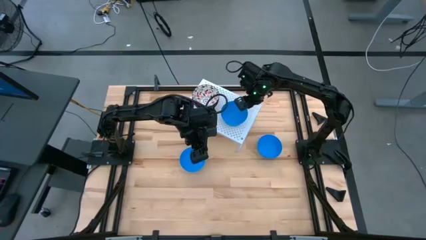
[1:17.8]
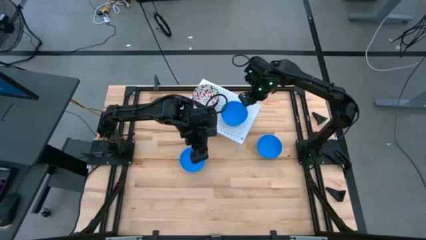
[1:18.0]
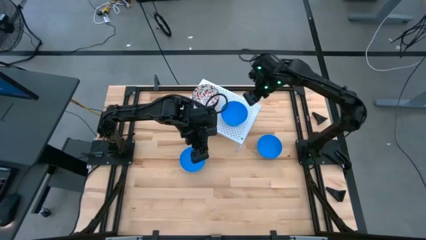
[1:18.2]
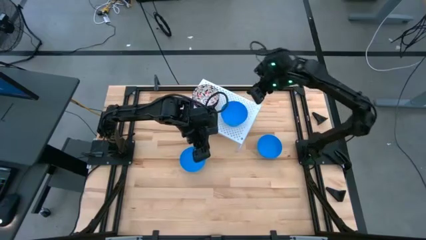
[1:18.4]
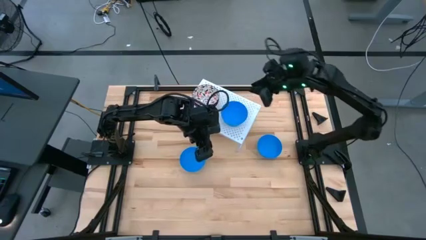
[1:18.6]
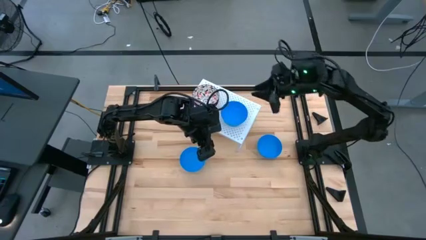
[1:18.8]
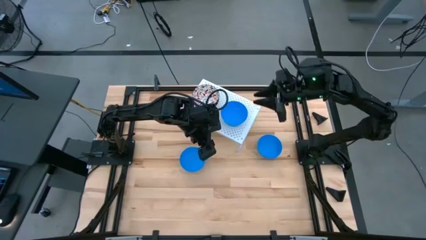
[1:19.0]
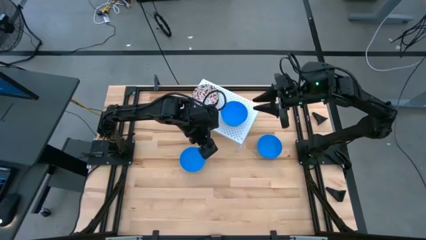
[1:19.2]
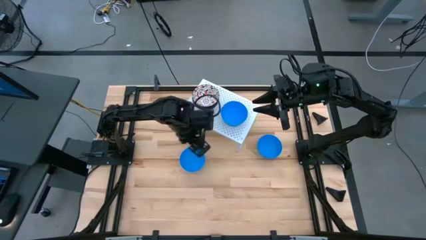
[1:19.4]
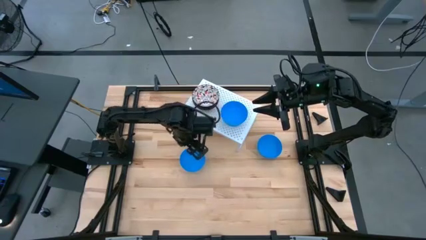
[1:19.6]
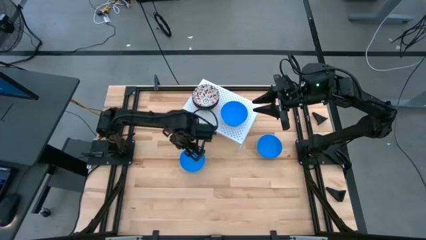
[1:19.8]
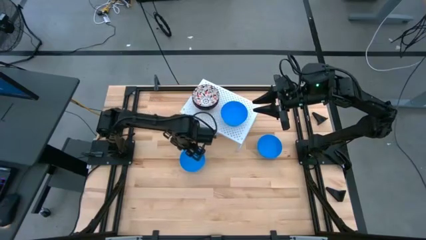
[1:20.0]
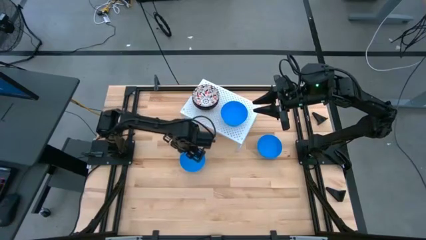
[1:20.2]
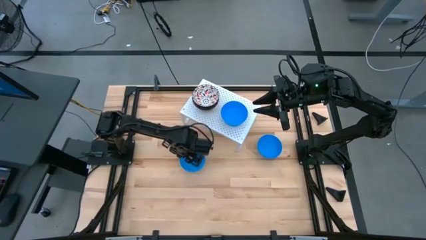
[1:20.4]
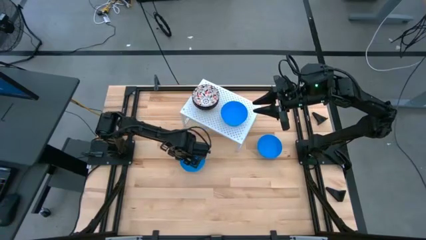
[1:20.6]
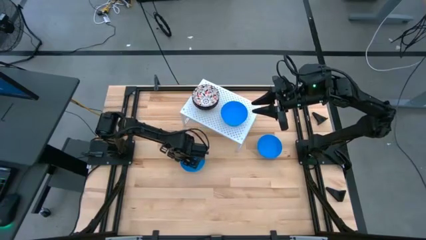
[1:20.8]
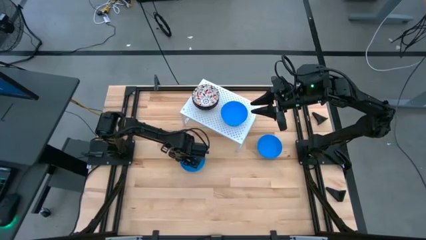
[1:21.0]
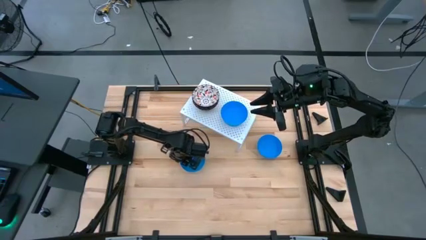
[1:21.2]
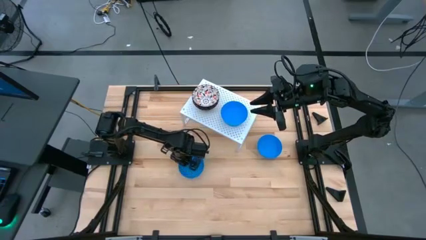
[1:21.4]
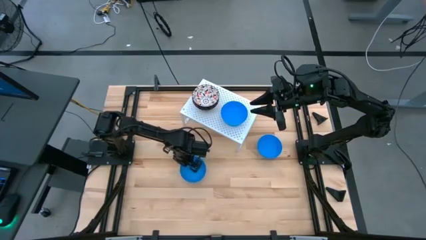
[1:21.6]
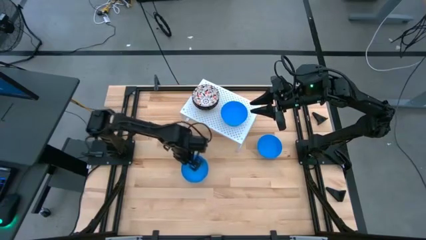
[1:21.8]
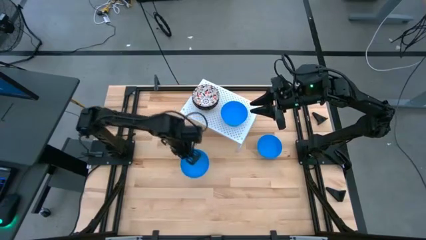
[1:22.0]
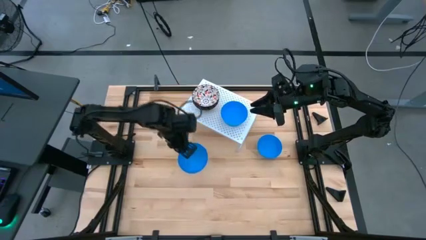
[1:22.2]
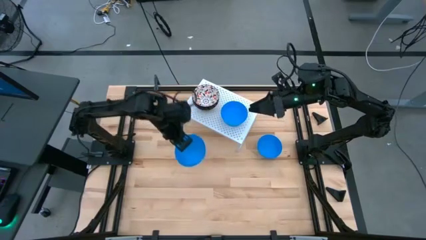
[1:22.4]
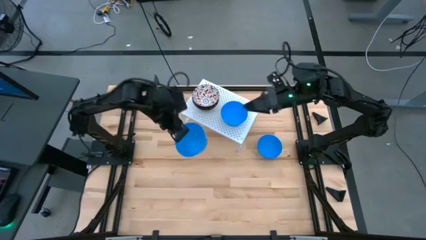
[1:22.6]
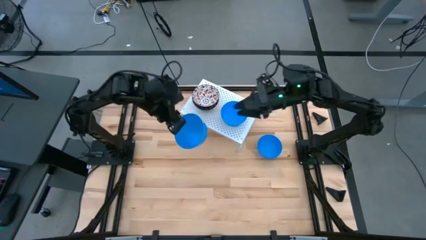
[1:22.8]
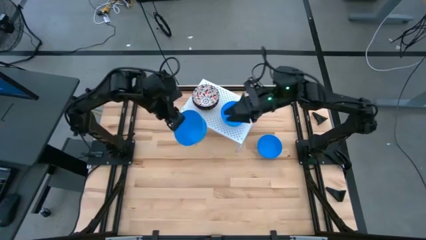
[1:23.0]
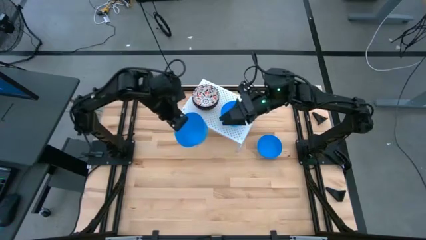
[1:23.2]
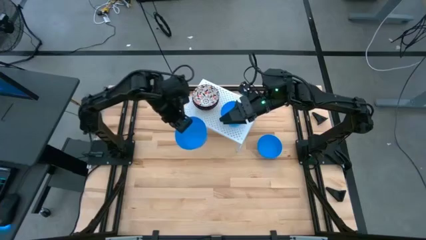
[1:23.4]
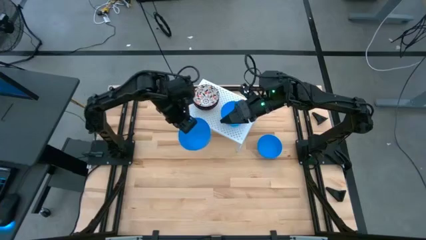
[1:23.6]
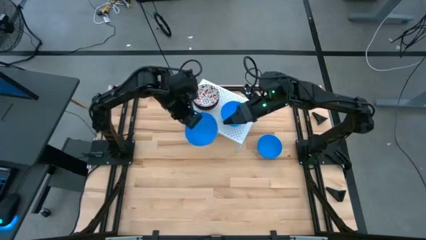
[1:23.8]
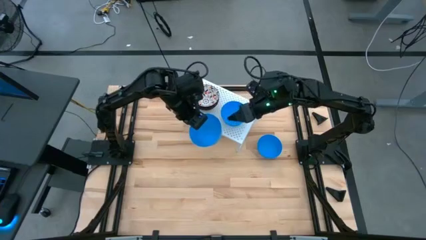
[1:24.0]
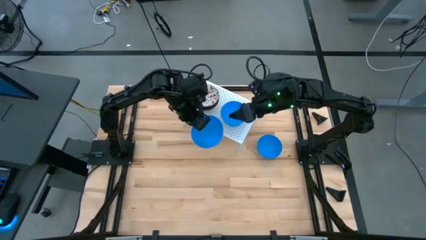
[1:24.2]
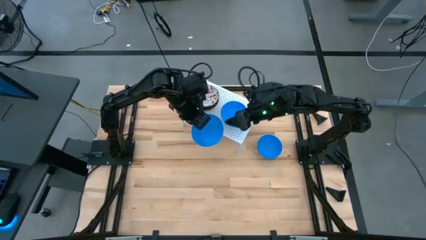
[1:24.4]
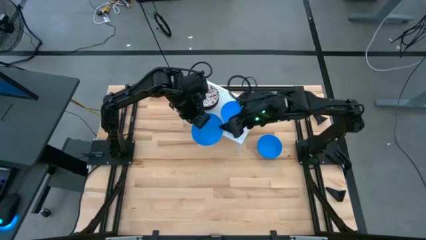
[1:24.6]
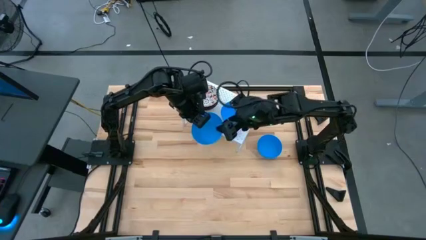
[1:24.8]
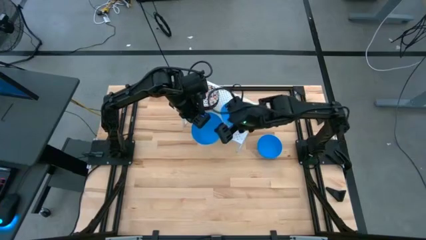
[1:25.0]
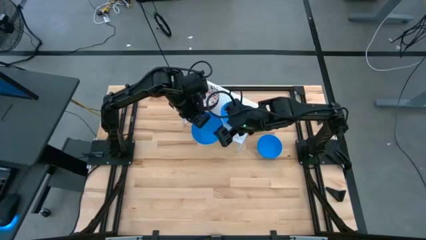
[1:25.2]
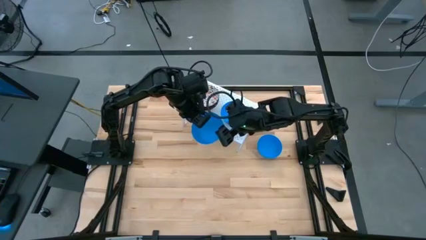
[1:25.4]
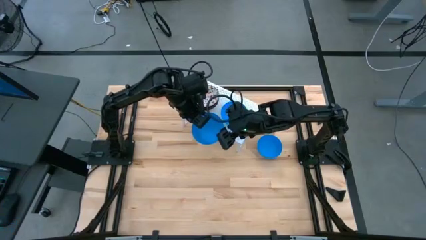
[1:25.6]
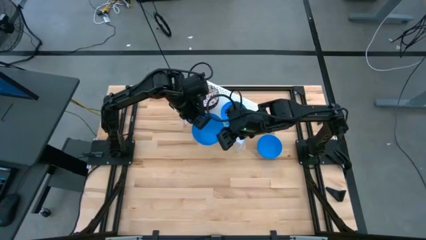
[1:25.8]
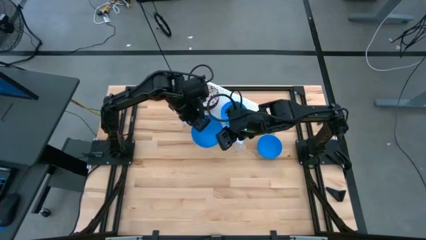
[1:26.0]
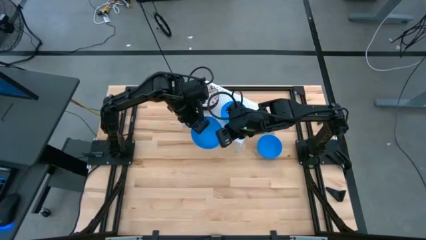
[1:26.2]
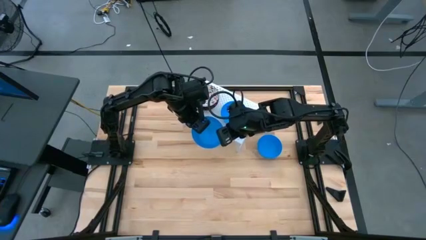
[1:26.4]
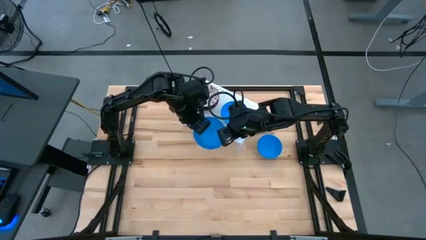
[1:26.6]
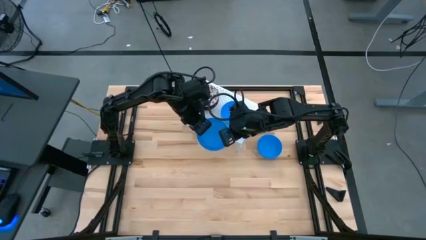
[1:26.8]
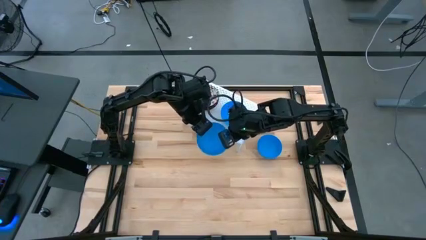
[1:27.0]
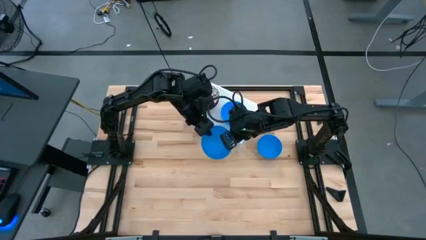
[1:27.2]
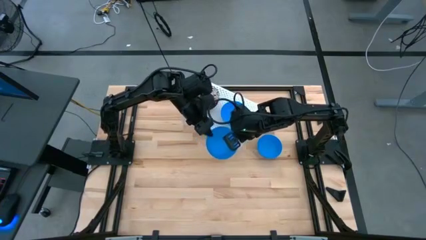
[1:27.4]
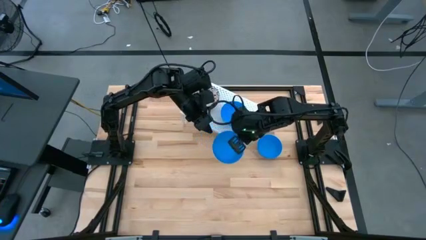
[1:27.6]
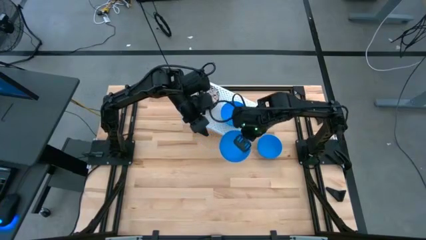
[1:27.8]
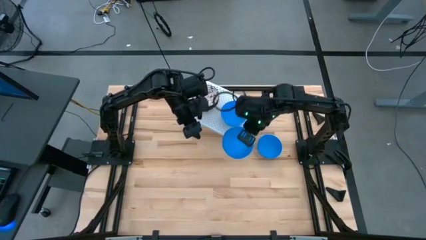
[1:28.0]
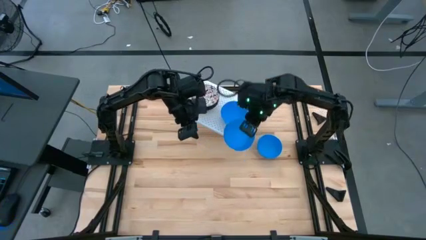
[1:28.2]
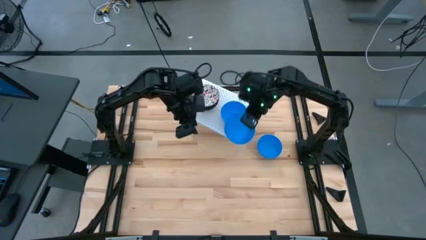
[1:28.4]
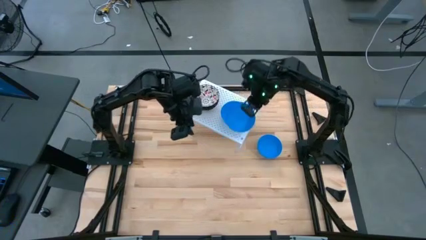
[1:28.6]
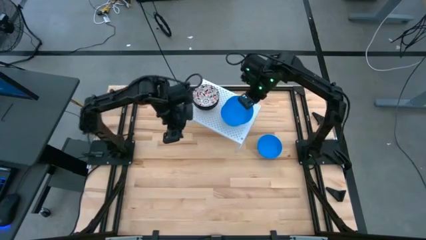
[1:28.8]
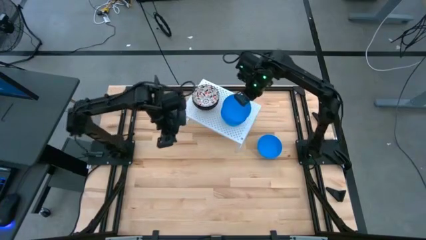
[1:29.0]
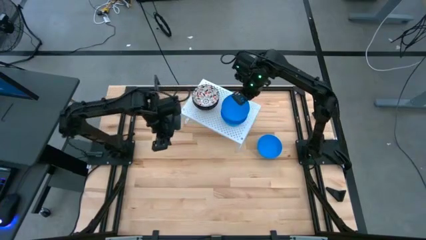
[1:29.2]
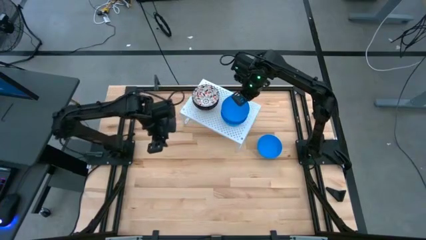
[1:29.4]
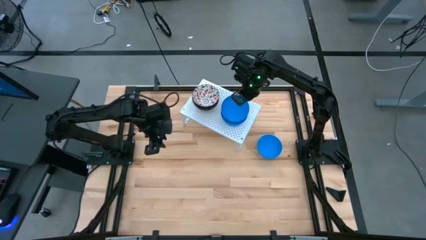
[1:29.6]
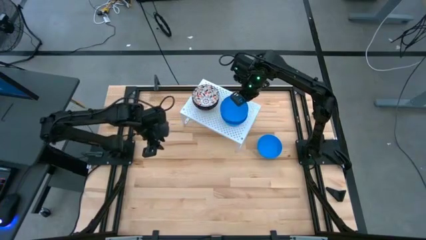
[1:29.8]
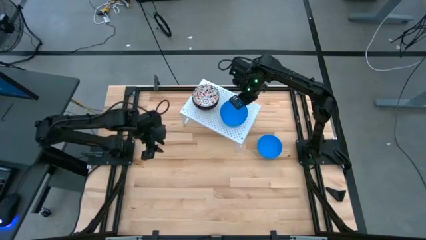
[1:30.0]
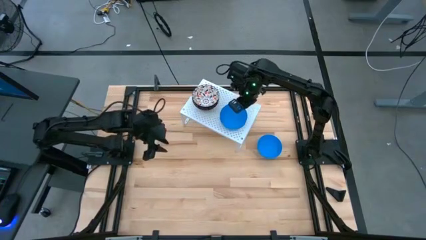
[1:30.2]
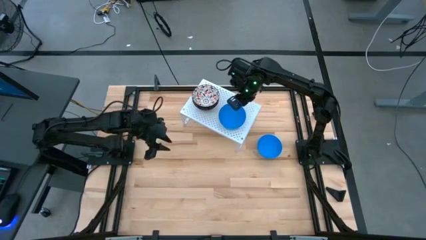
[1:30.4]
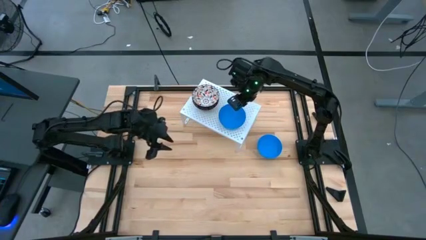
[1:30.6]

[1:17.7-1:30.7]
Task: Pick & Place Mini bowls
Stack the left blue bowl on top of the other blue bowl on the shelf

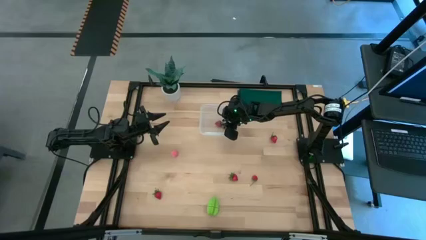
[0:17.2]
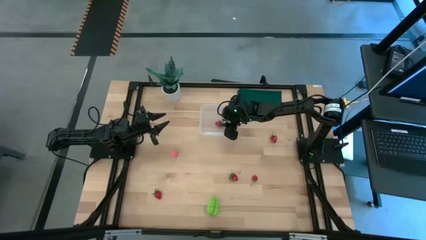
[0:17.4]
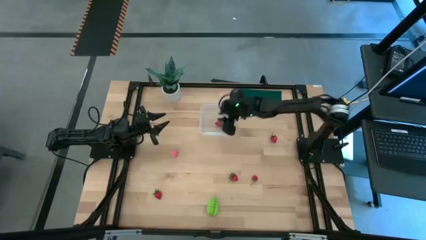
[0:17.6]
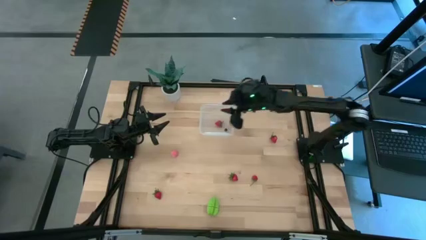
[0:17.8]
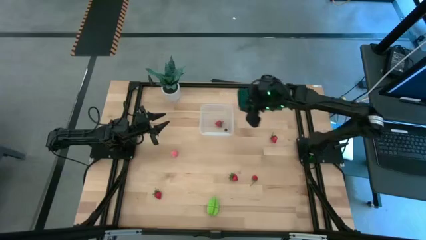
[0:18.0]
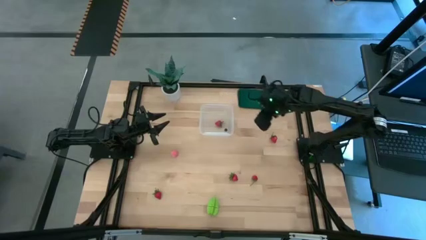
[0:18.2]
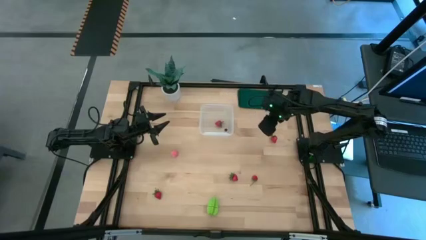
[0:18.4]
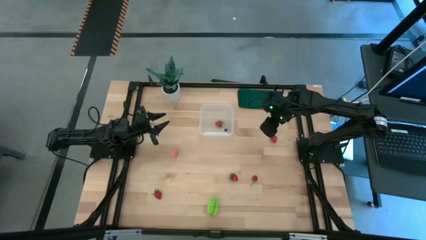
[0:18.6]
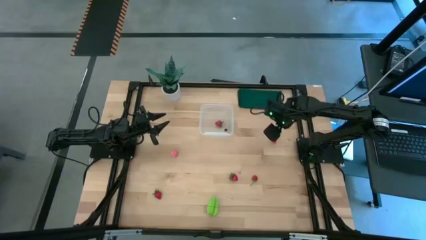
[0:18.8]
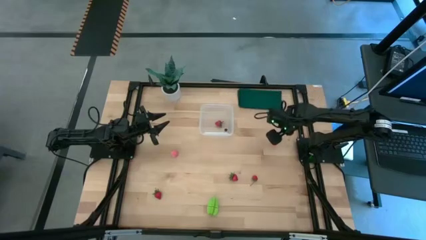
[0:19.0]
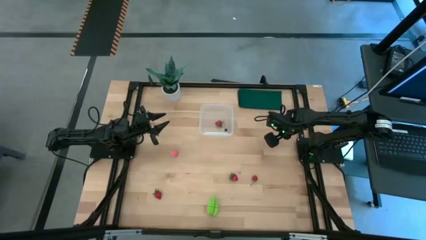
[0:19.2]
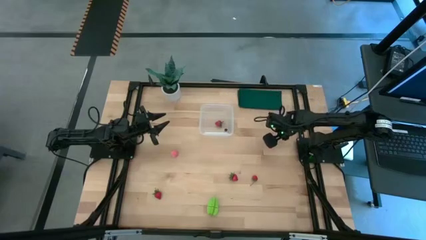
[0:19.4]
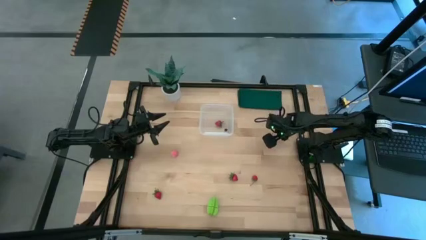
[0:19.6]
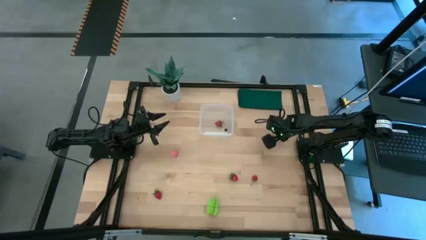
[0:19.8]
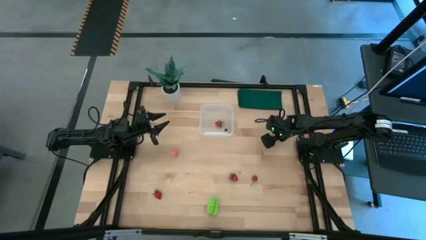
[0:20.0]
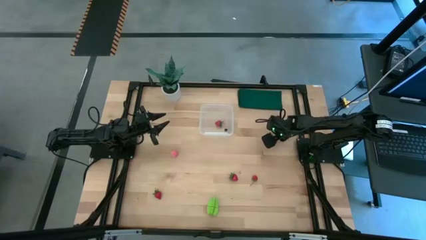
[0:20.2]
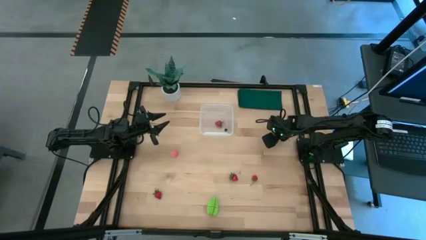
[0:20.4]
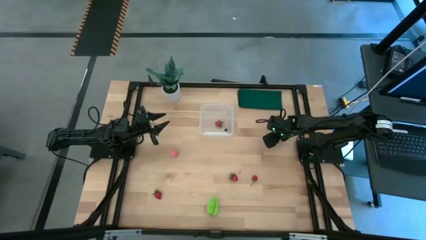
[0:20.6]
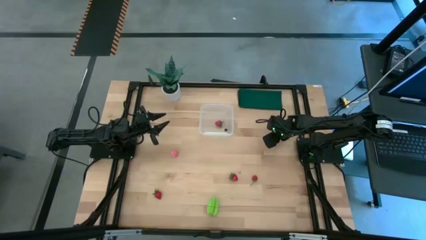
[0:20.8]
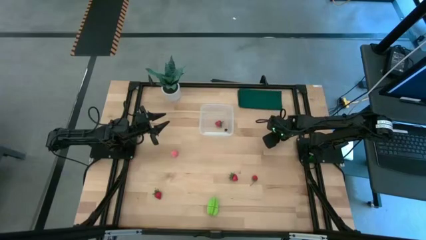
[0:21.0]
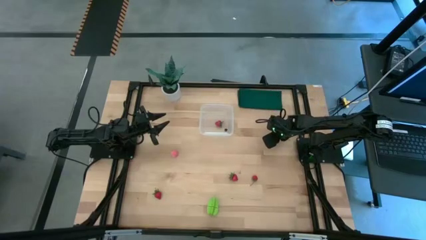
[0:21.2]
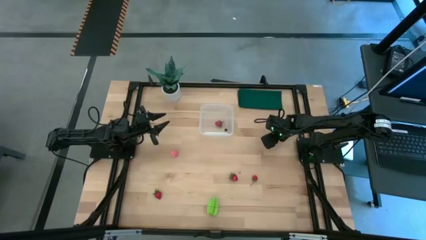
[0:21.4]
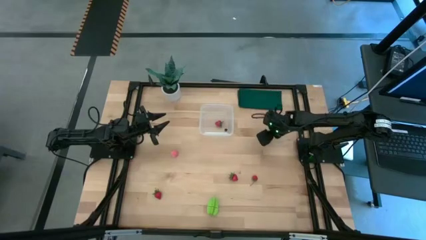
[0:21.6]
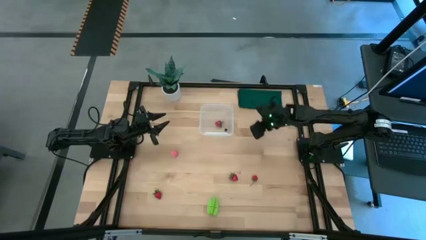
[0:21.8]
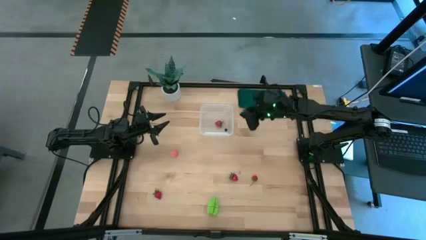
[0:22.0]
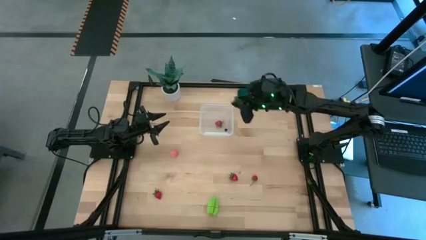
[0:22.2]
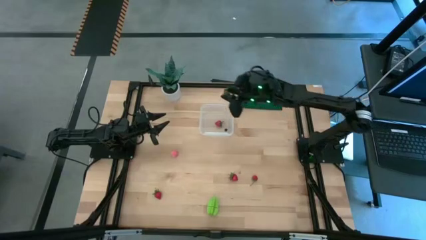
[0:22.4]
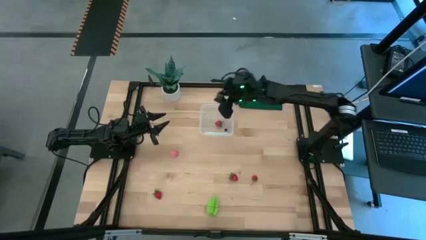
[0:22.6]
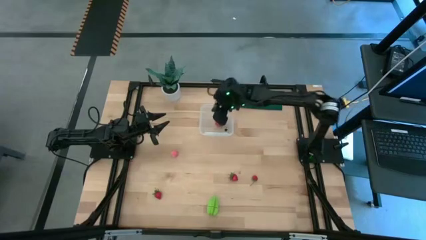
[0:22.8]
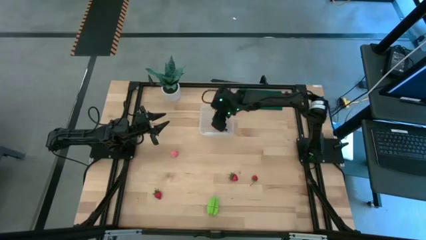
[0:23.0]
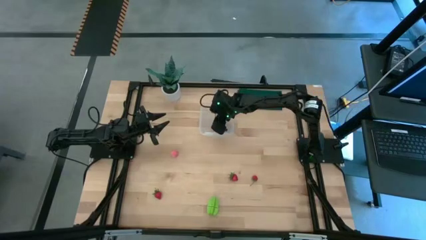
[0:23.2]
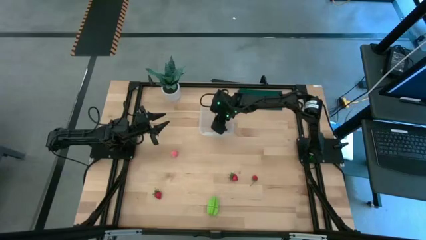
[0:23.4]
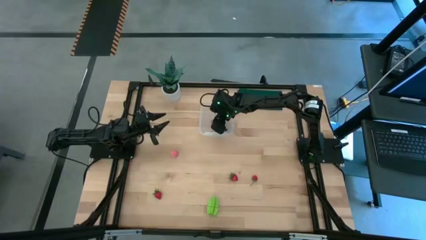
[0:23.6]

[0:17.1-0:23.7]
Task: Pick and placing Produce into tupperware
Put the strawberry into the transparent container
